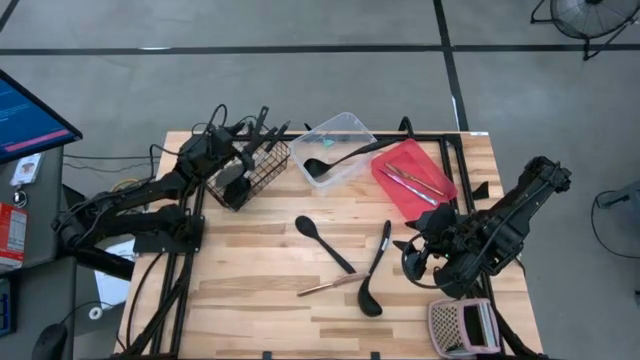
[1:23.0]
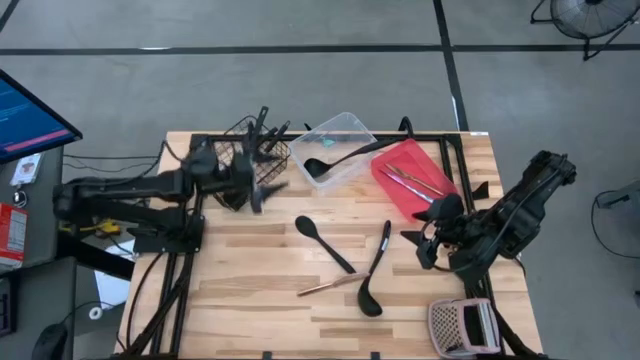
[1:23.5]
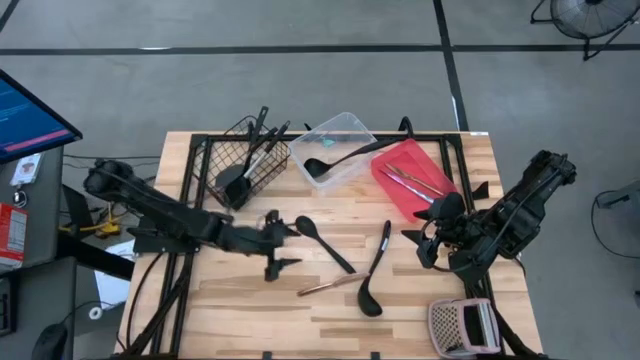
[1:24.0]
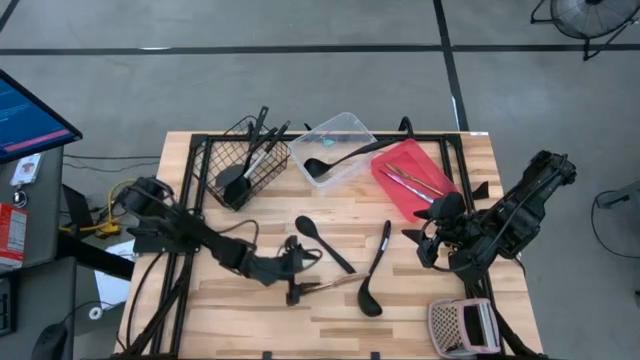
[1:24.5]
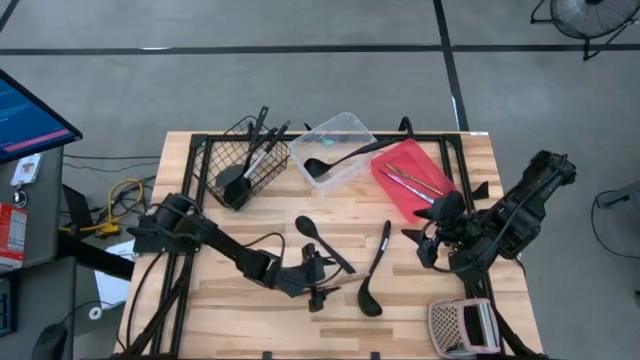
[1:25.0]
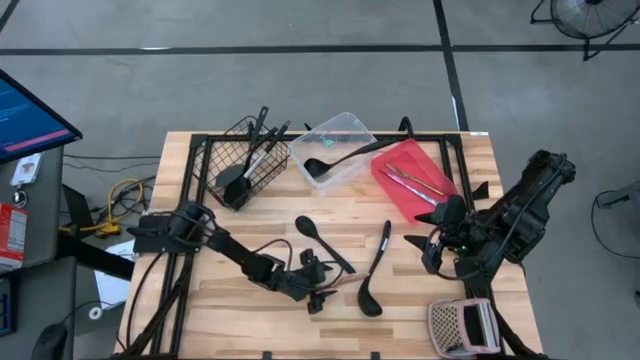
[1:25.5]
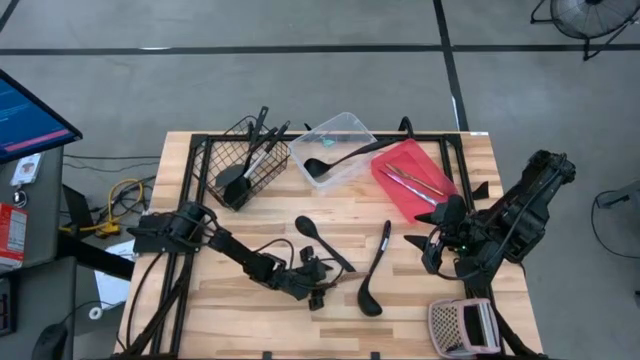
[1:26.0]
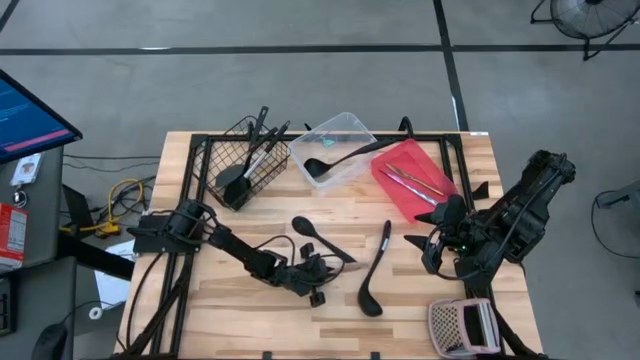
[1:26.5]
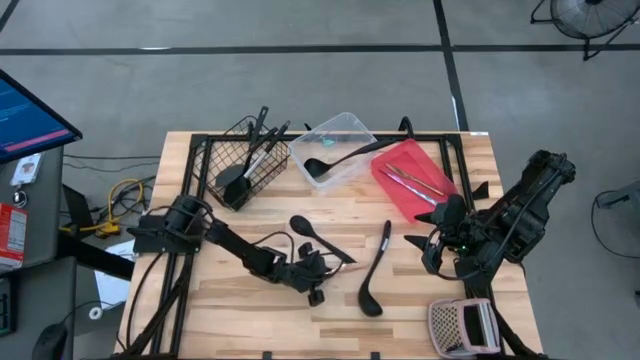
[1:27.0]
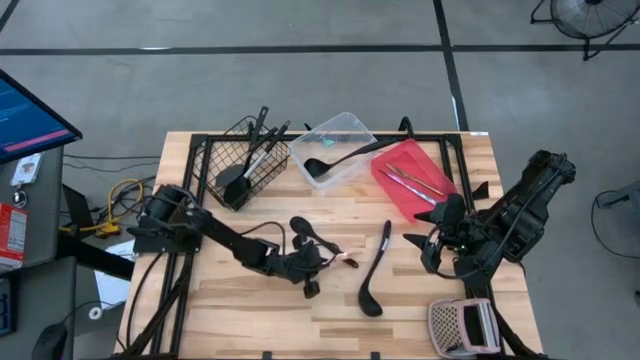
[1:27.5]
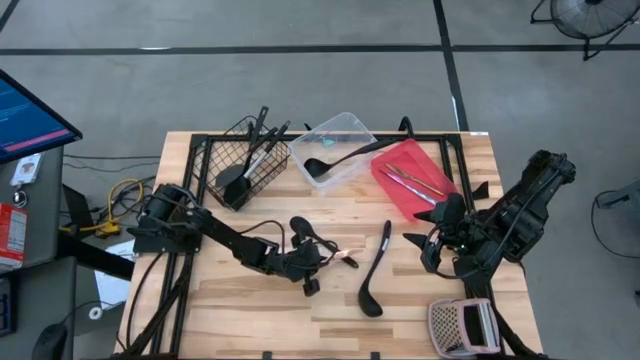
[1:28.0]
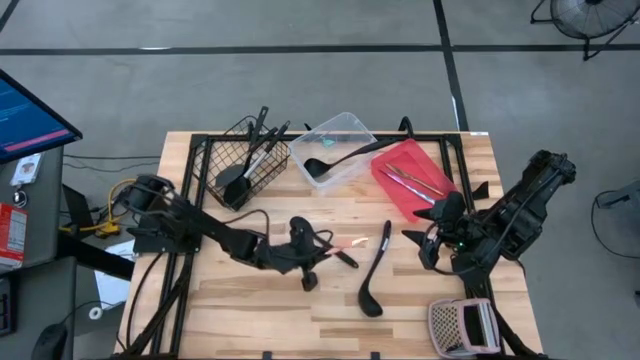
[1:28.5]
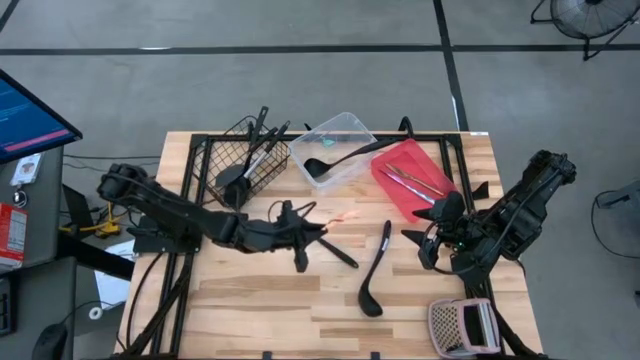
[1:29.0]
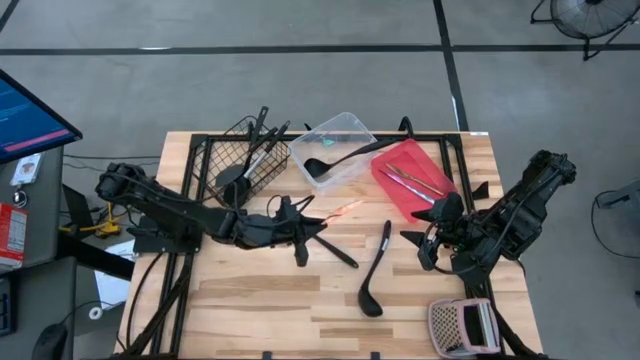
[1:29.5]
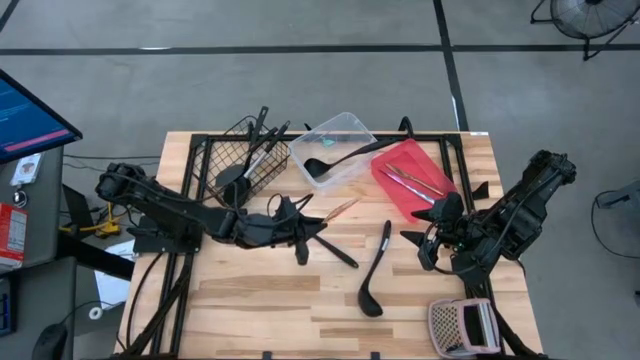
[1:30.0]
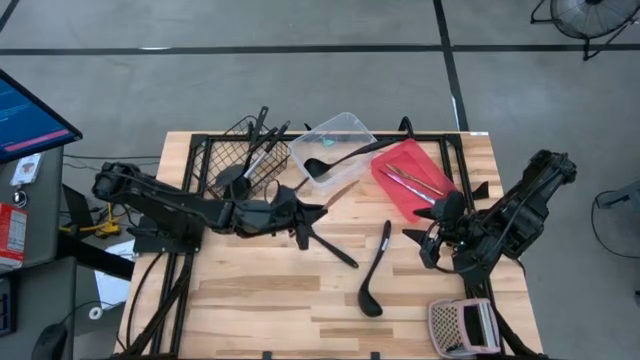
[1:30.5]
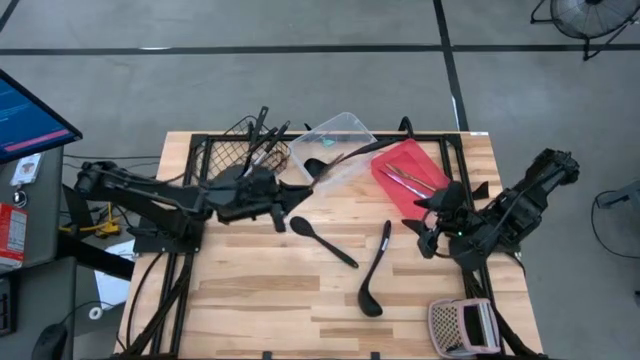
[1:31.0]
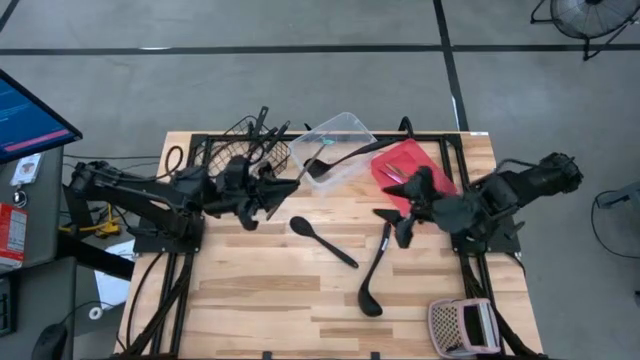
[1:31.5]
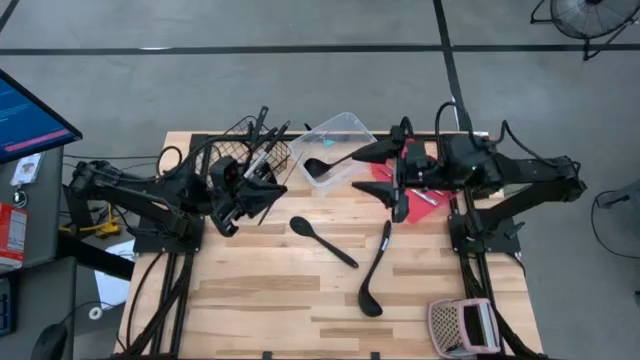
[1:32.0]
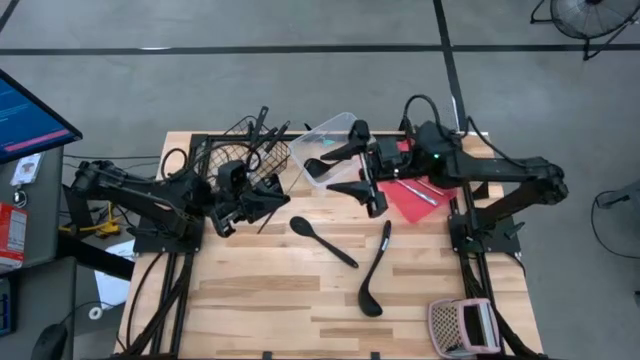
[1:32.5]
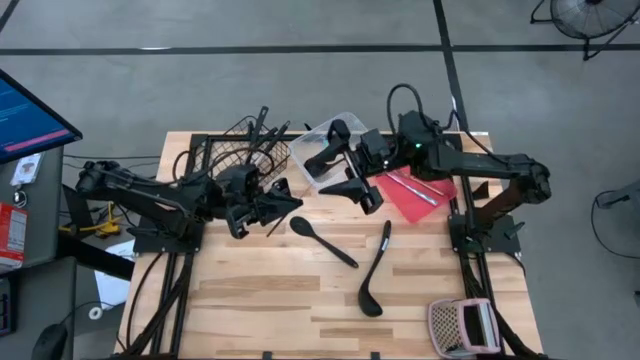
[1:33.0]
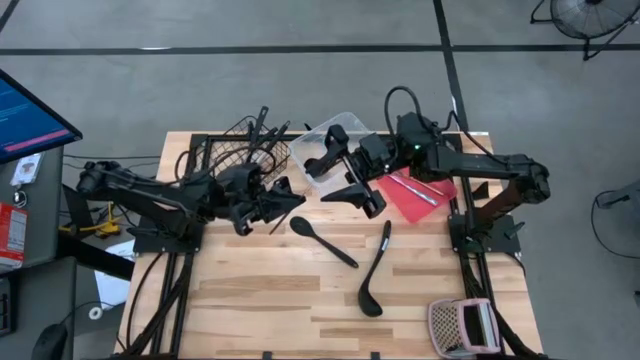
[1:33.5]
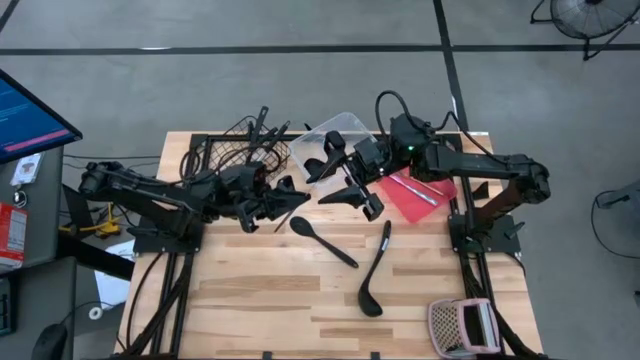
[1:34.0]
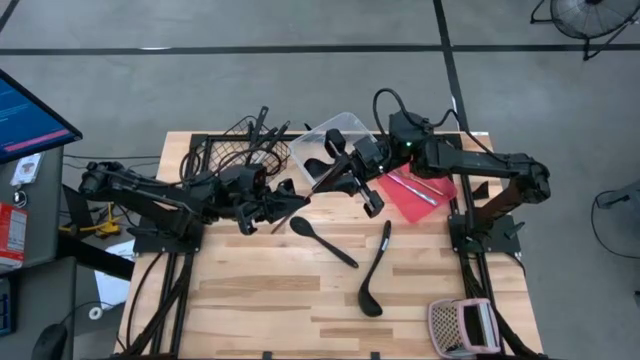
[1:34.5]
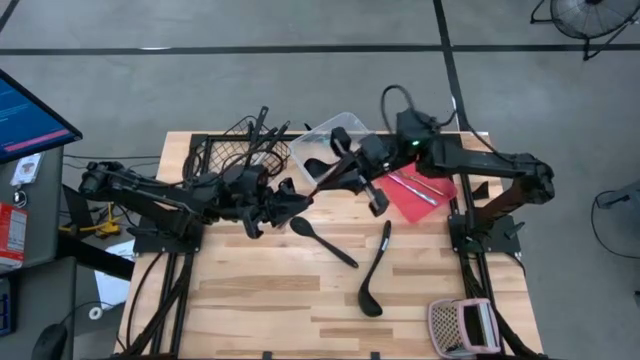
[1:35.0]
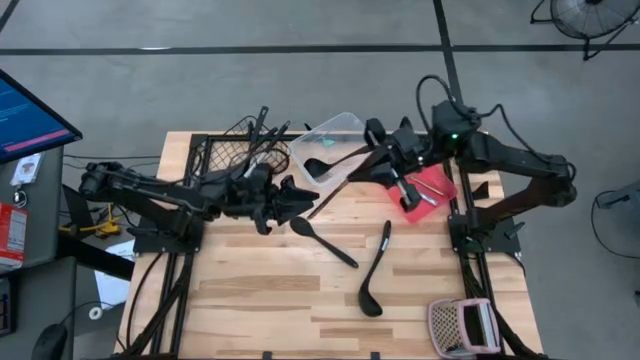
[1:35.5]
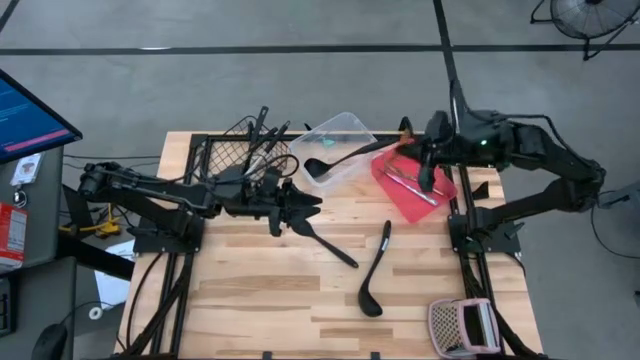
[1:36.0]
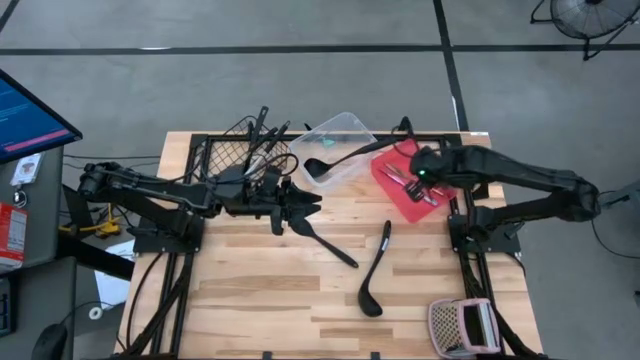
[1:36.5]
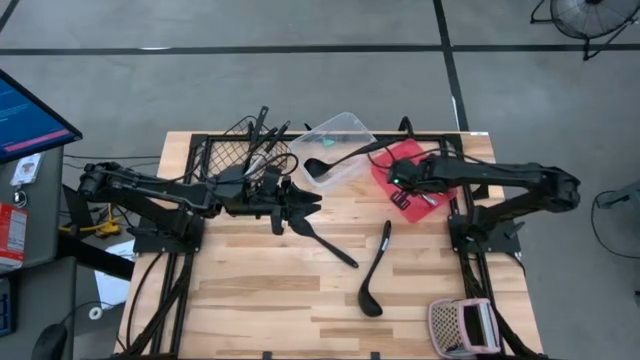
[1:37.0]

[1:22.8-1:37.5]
Task: Pick & Place Kitchen Items
Put the gold knife into the red bin

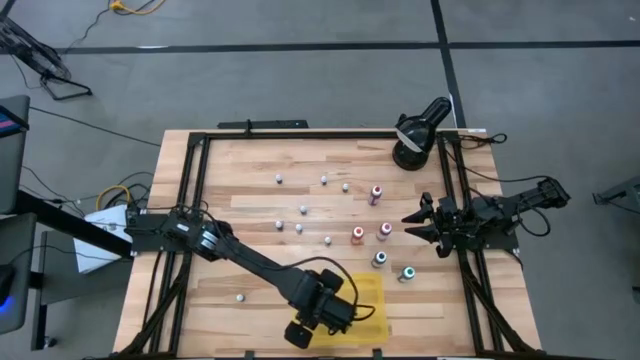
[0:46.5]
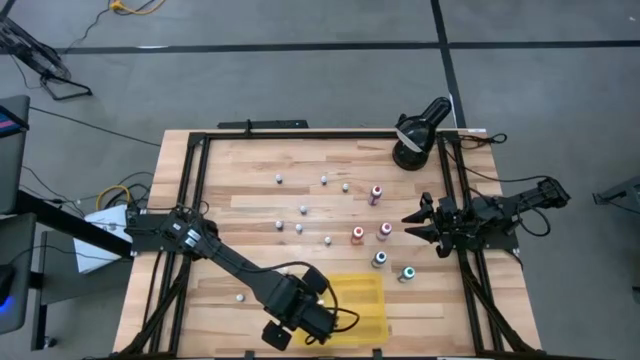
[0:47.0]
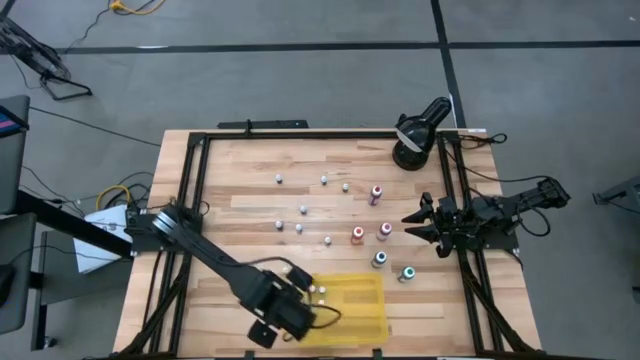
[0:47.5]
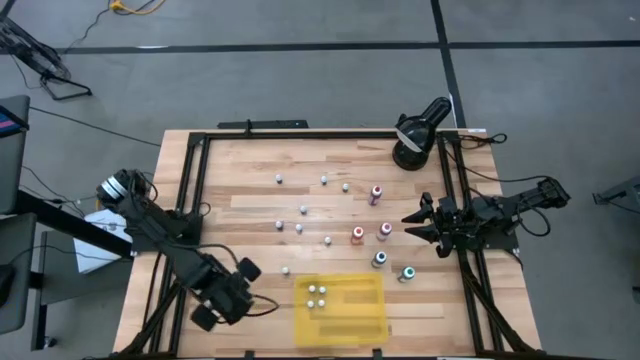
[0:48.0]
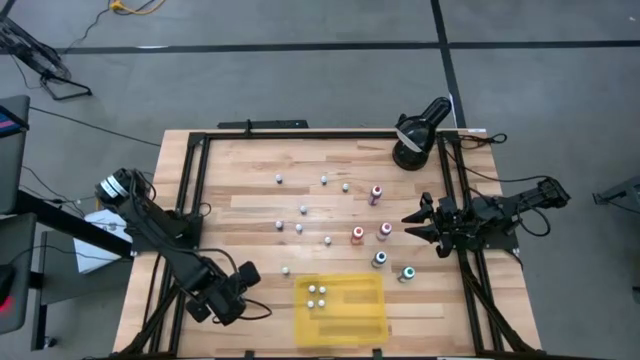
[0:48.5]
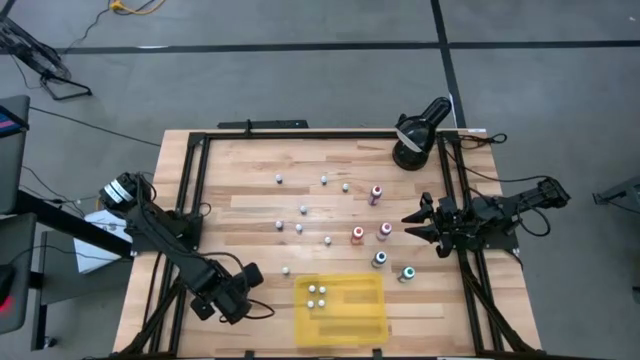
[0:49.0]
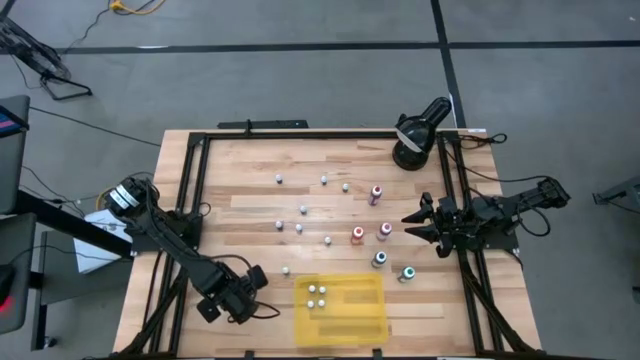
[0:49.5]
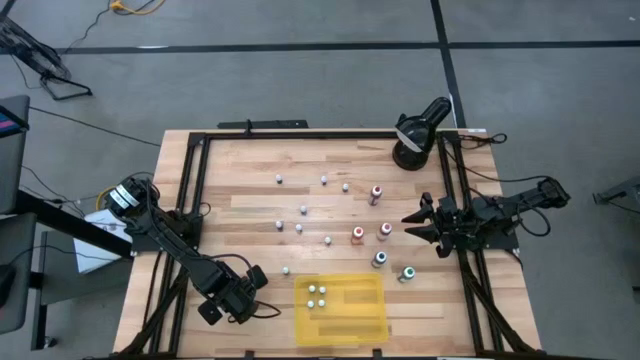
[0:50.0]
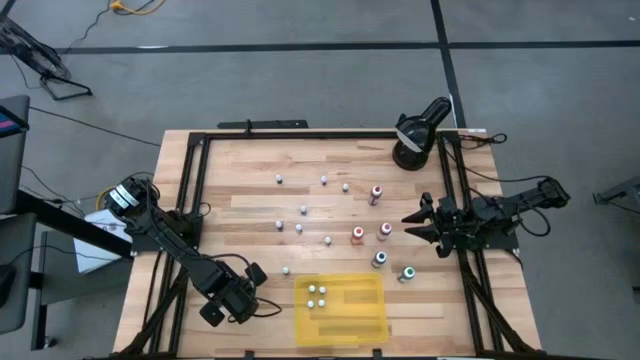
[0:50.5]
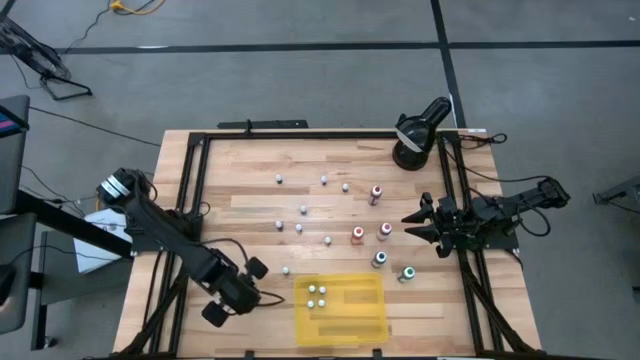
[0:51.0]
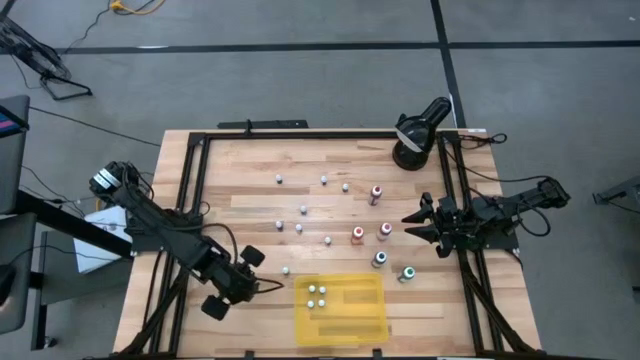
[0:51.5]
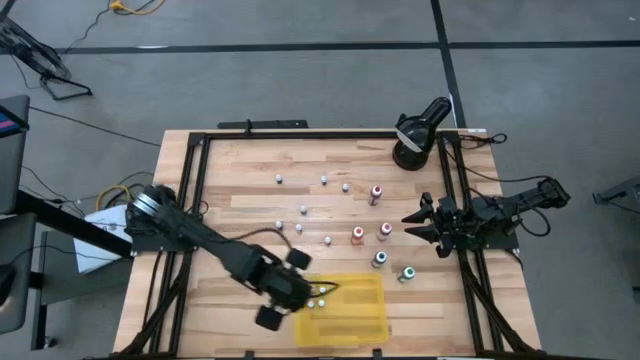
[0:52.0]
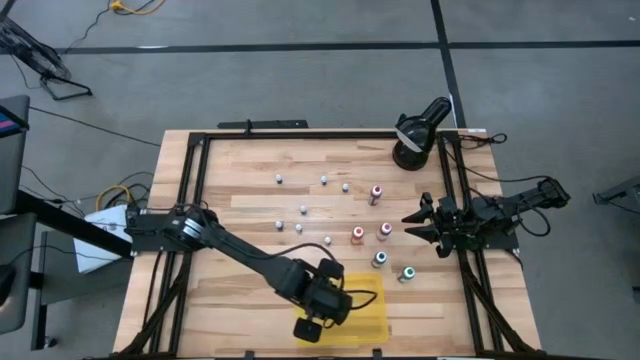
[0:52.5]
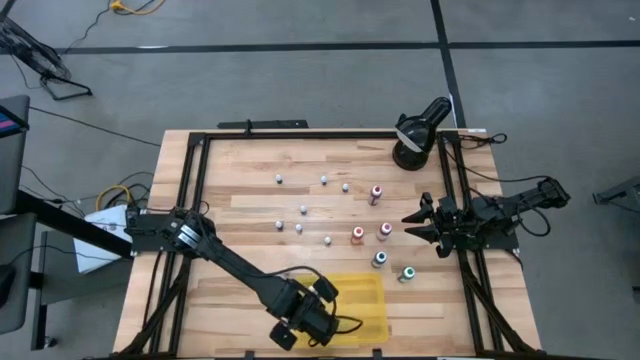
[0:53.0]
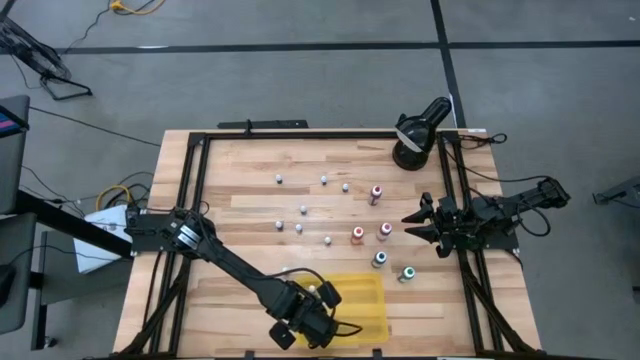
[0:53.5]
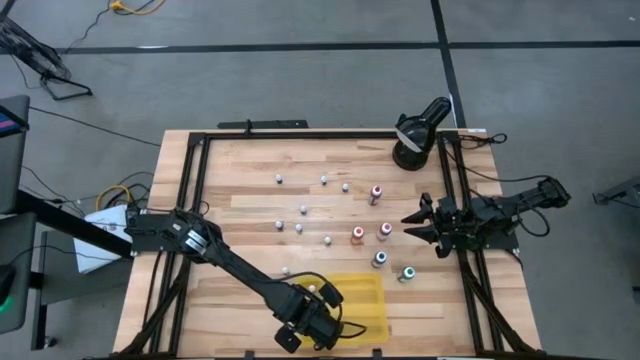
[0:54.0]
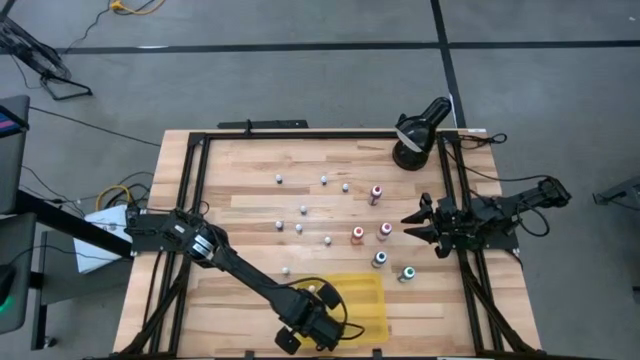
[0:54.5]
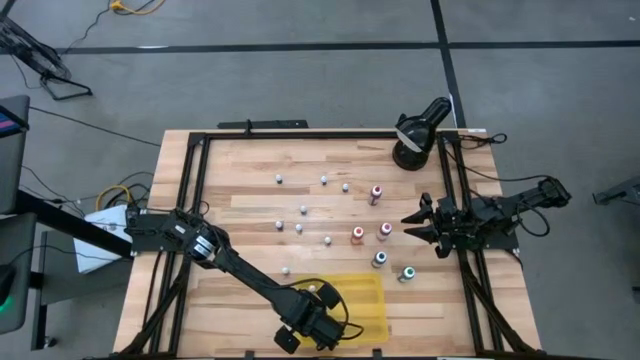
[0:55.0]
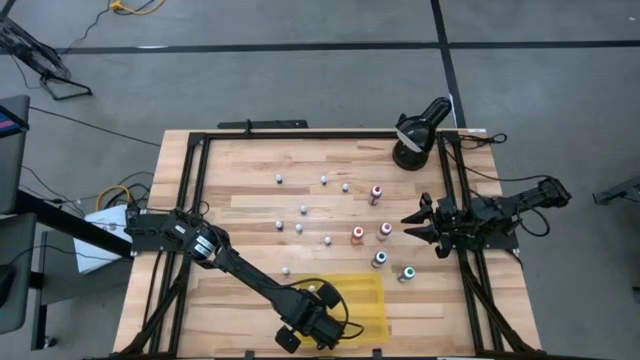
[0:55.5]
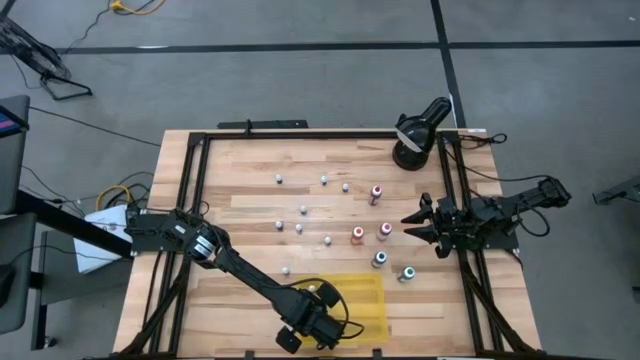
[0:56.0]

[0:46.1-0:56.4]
Task: Pick & Place food coloring
Put the small purple food coloring bottle in the yellow bin
